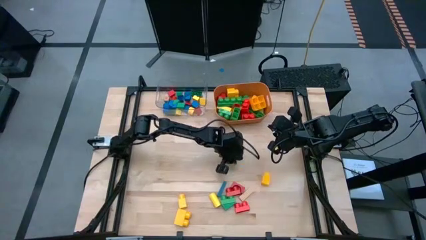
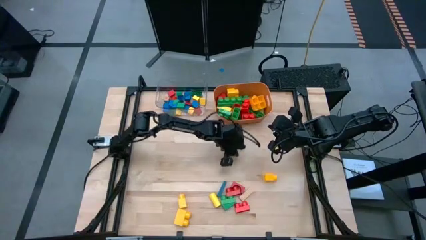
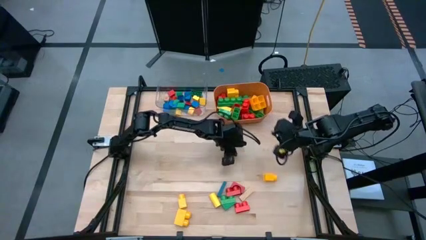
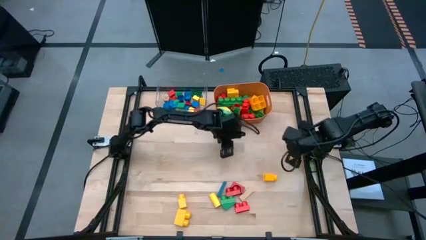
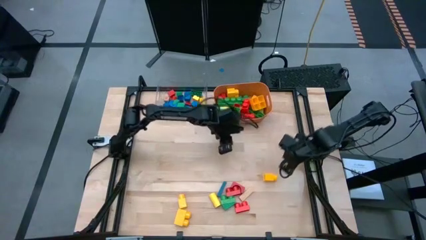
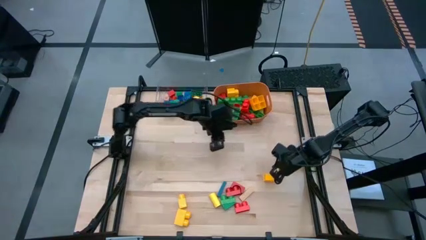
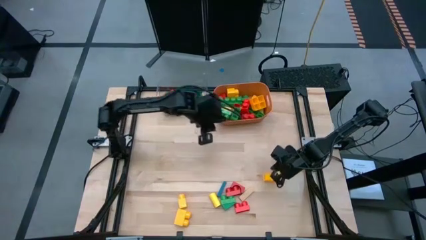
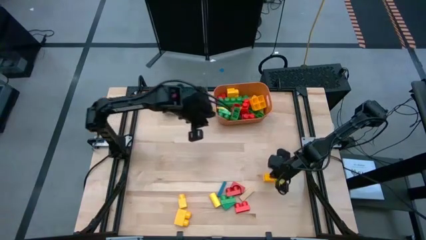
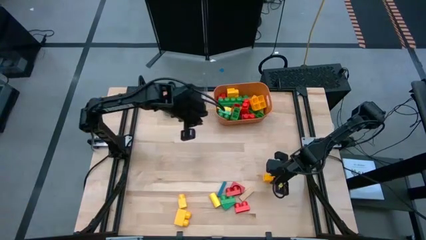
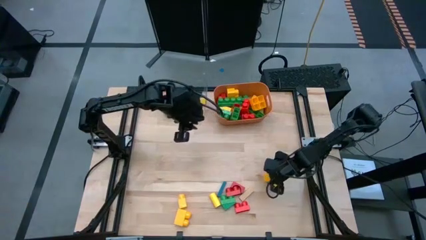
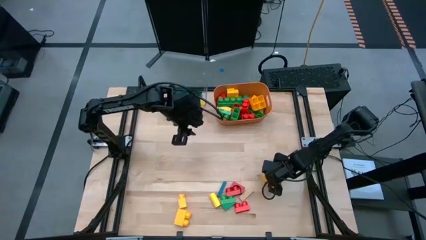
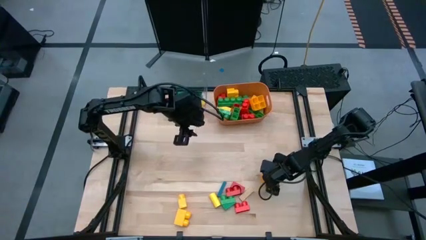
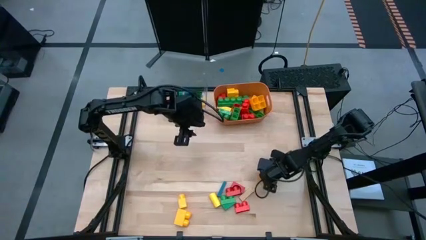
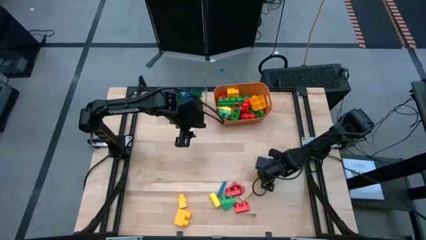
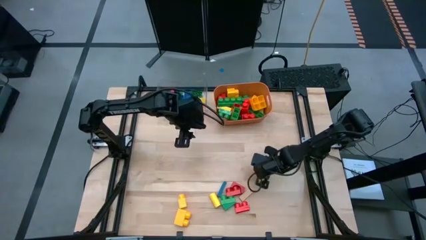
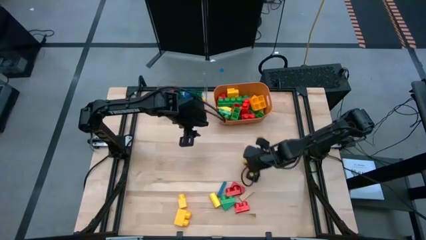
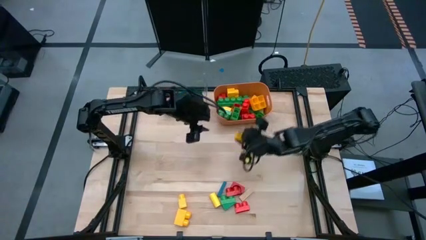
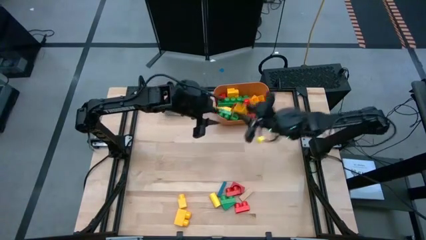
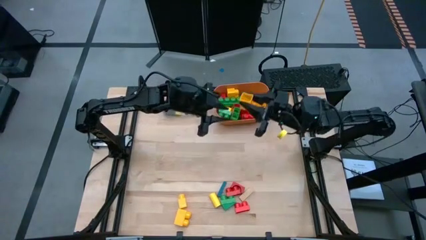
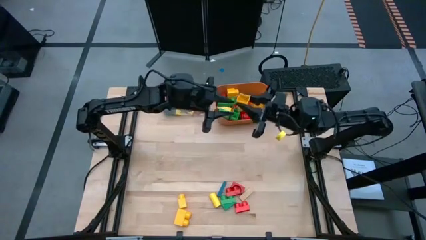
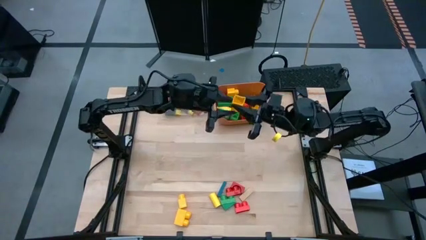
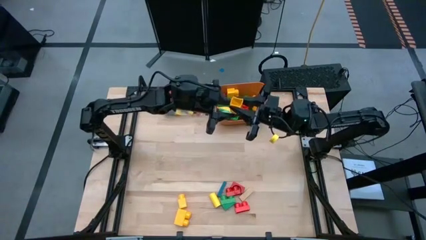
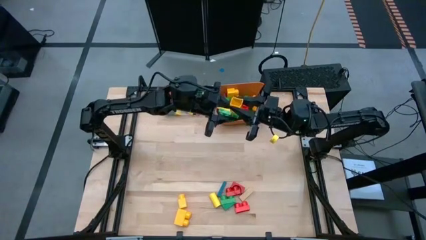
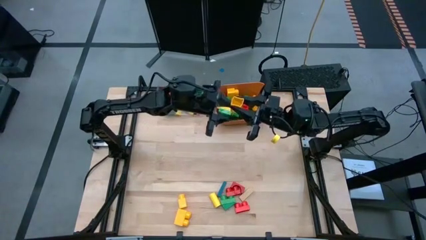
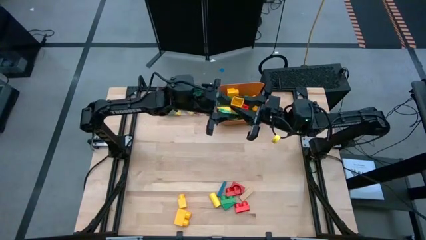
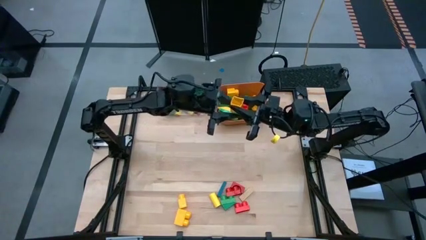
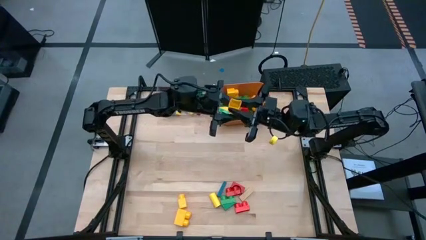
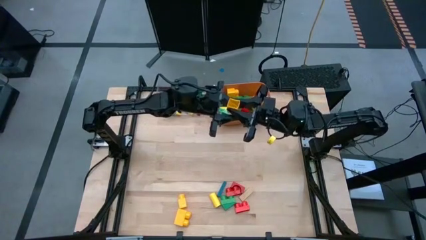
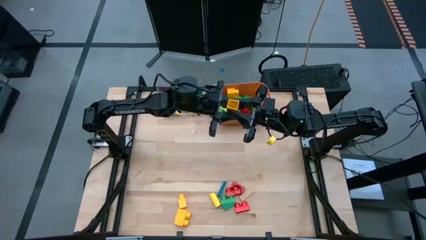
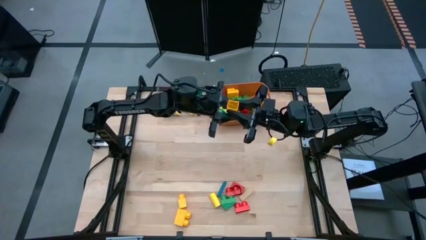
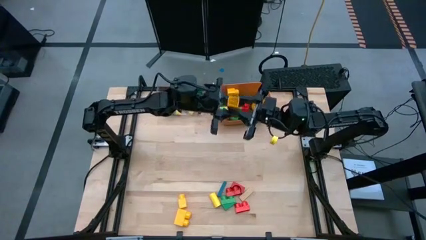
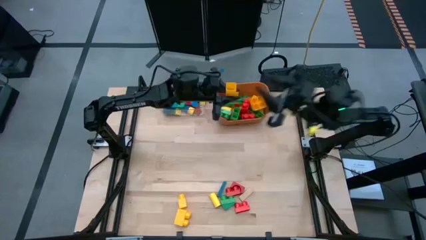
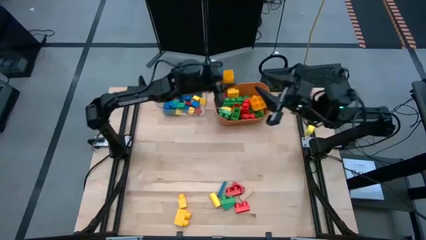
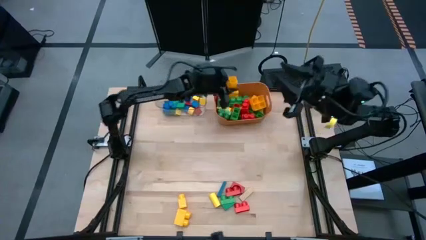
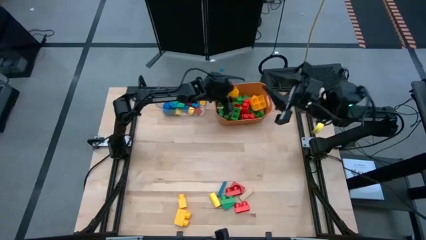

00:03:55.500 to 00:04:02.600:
Task: Sort blocks by size
Put the big yellow game piece into the orange bin

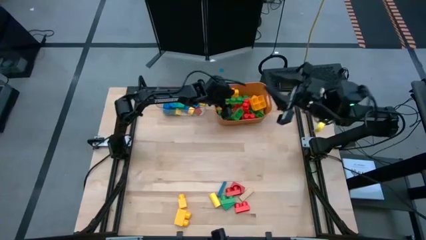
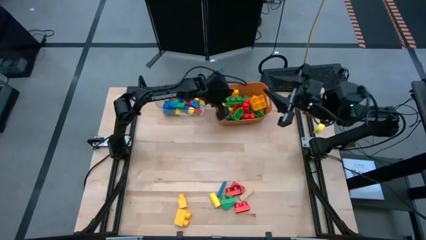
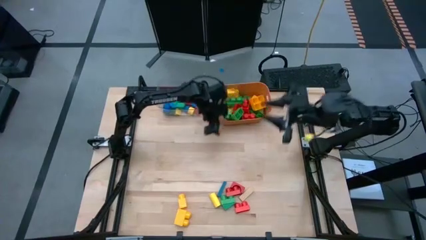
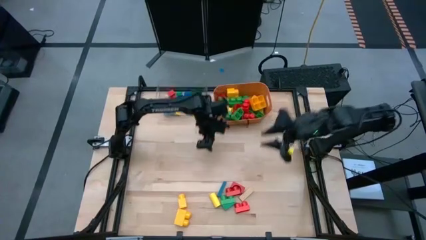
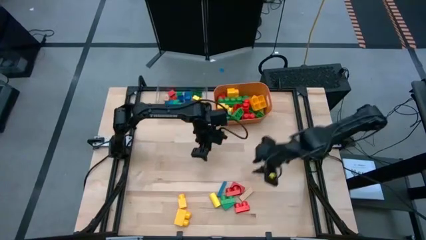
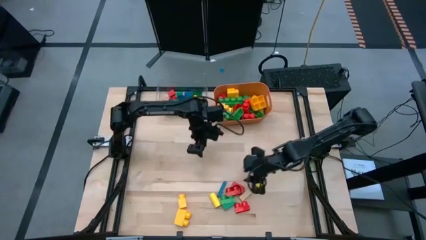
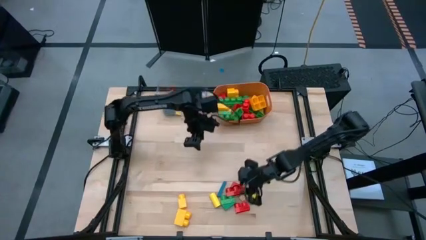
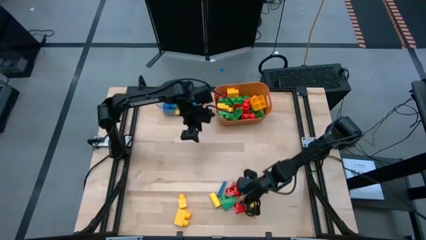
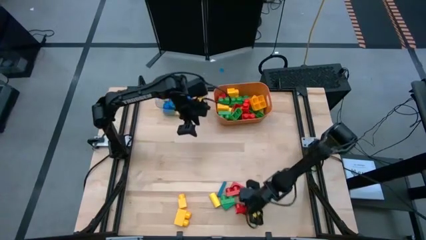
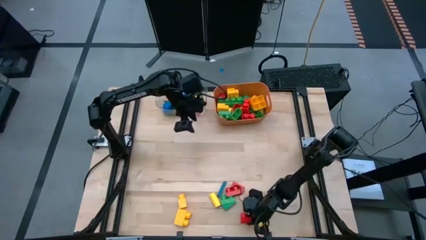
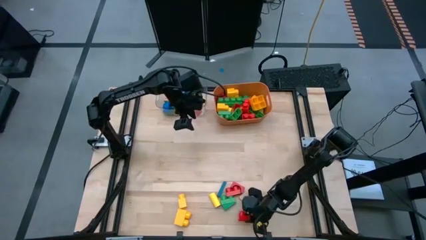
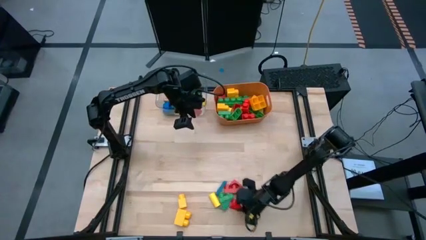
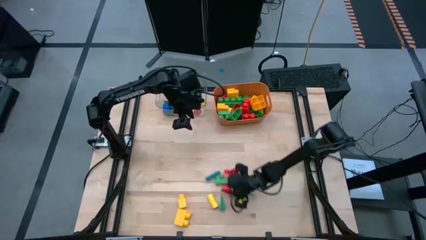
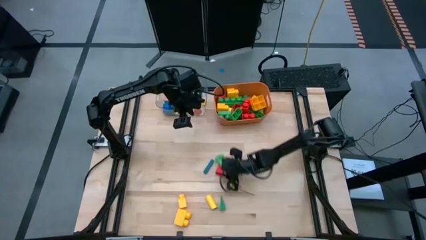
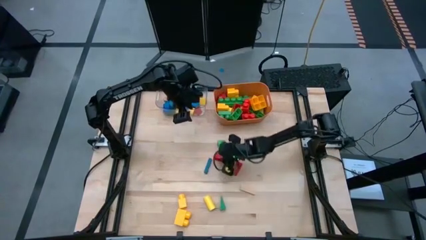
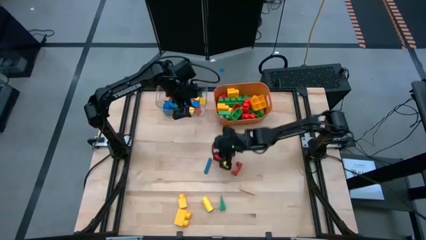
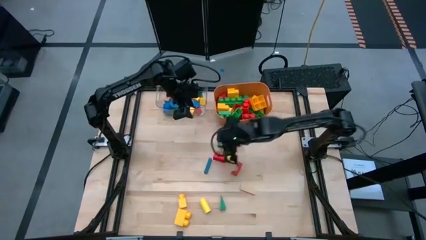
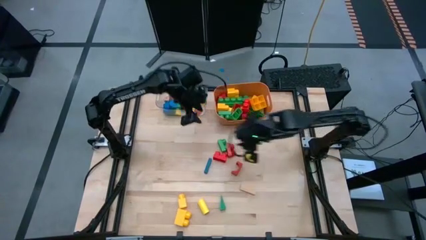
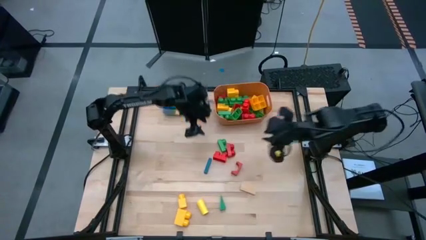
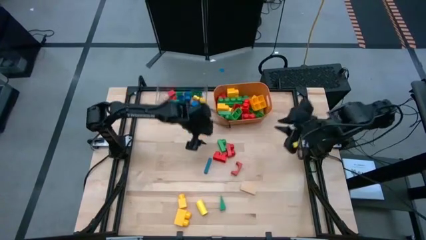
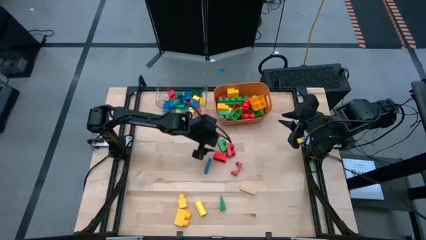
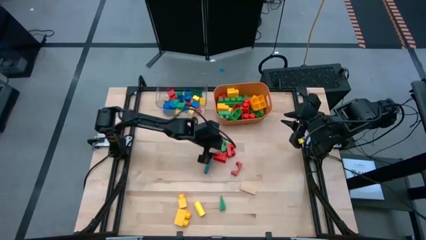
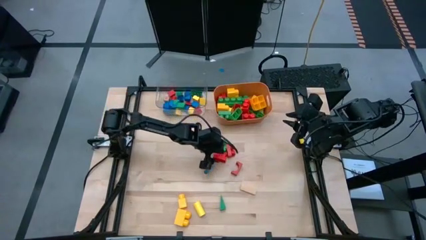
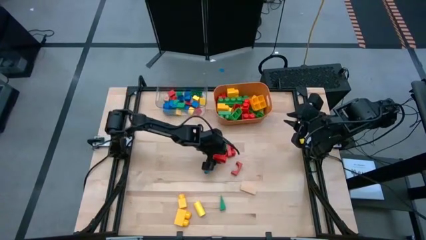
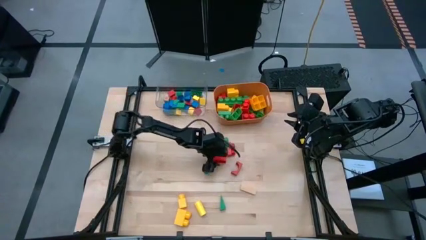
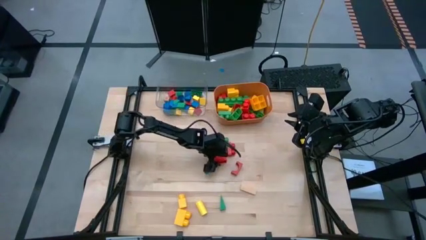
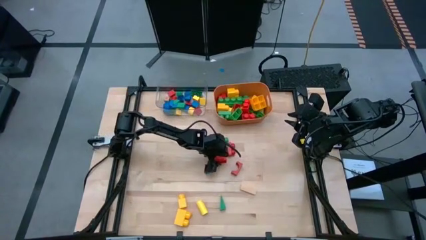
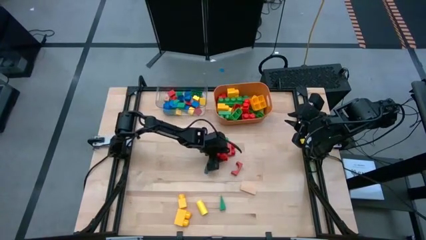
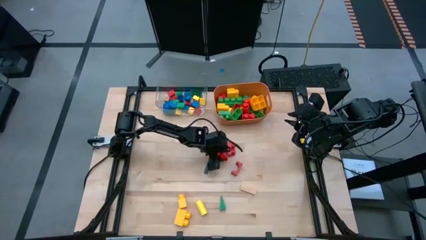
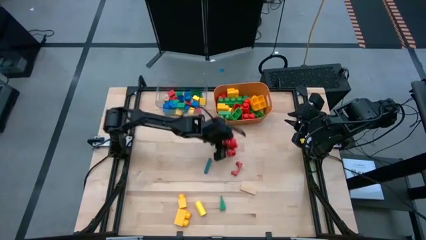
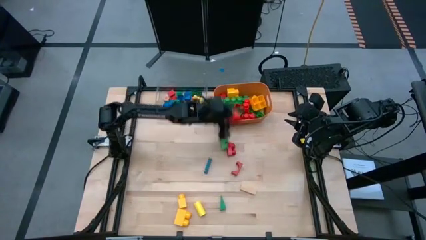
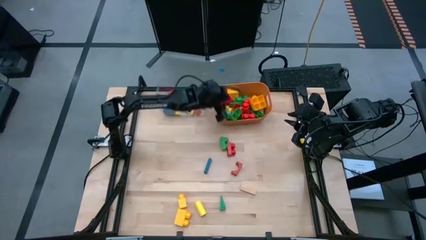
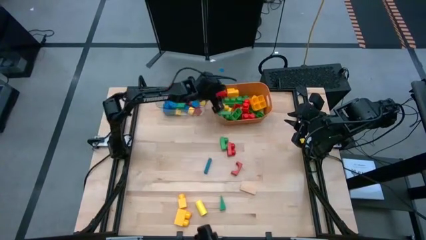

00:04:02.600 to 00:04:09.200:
Put the big red game piece into the orange bin

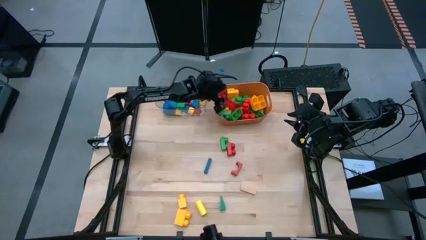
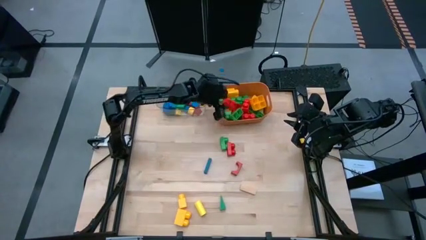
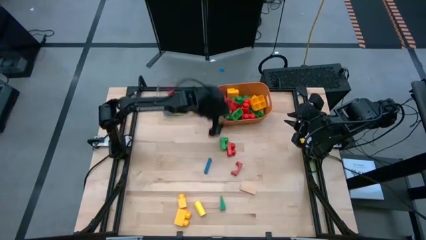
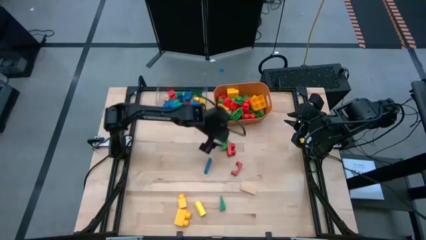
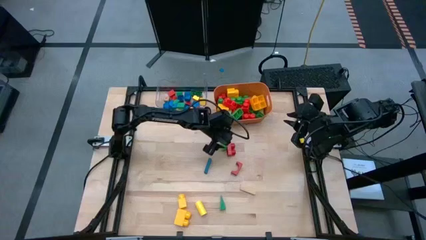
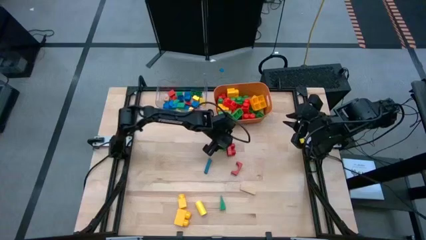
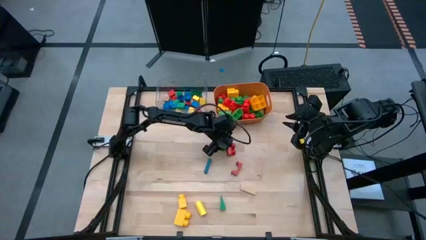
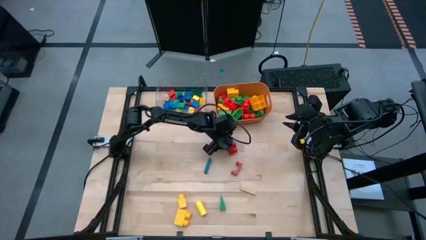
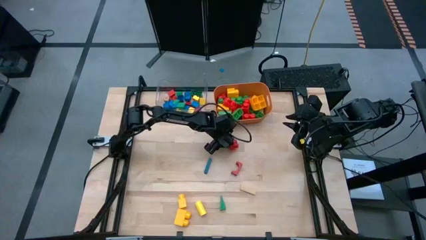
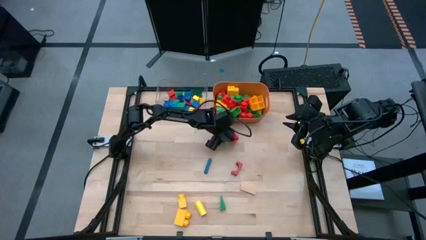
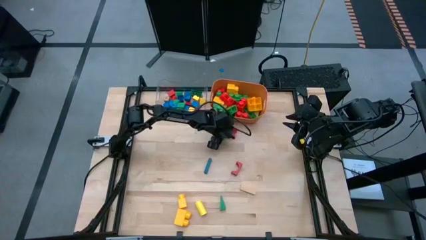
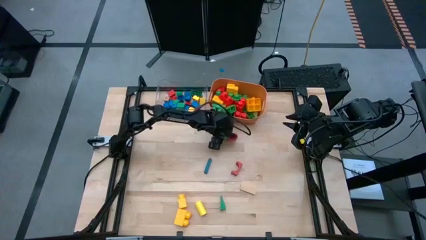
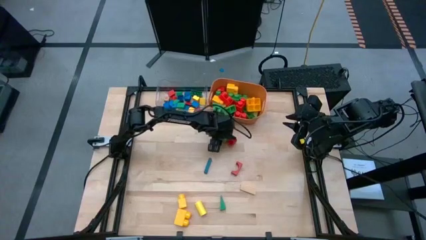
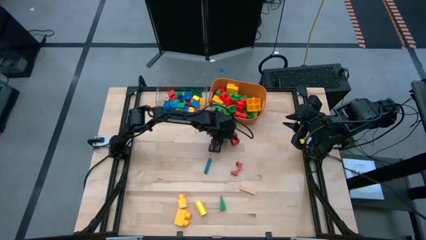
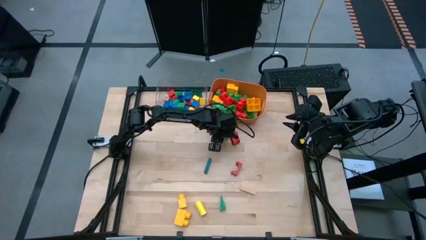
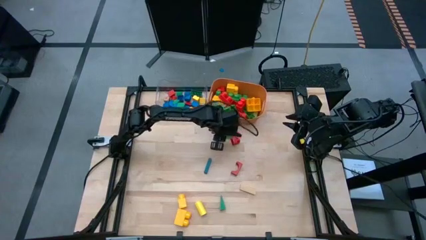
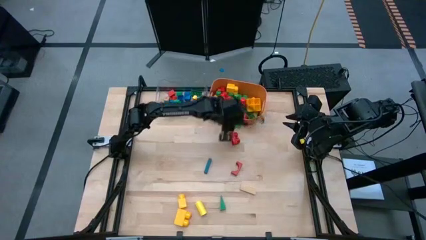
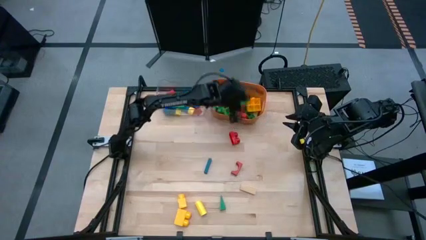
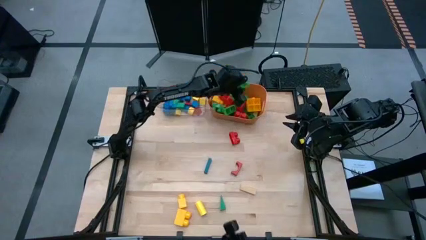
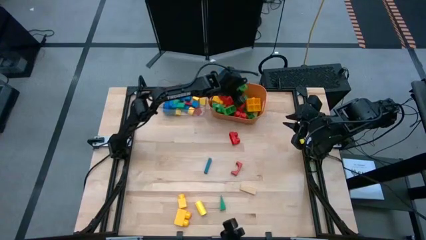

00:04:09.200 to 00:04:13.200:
Put the big green game piece into the orange bin
